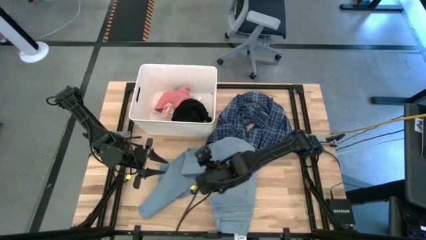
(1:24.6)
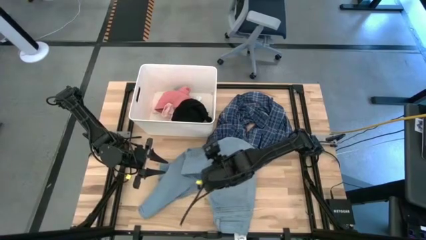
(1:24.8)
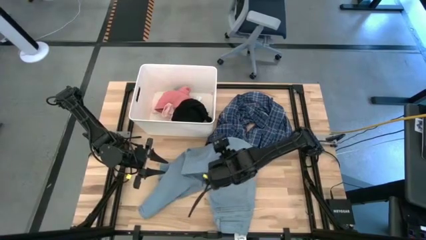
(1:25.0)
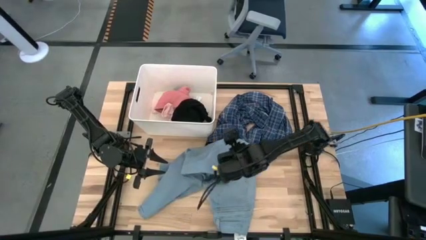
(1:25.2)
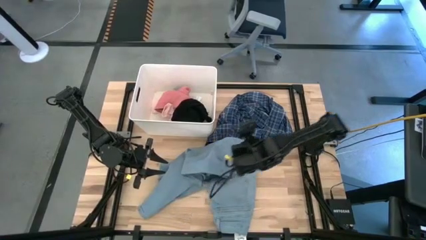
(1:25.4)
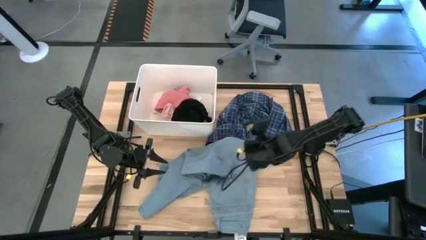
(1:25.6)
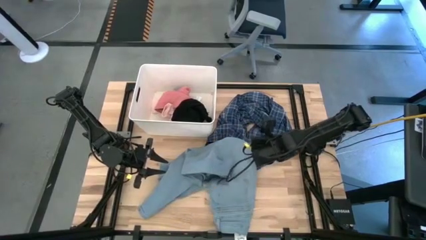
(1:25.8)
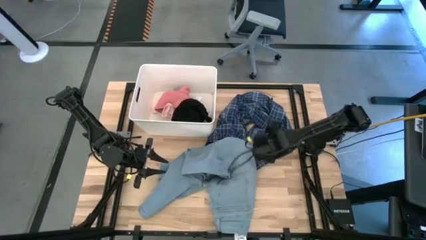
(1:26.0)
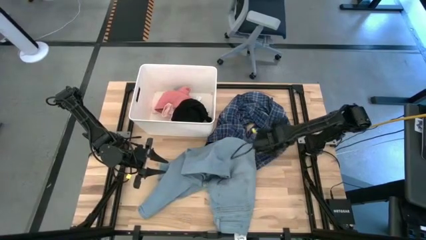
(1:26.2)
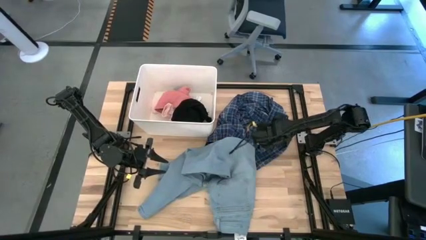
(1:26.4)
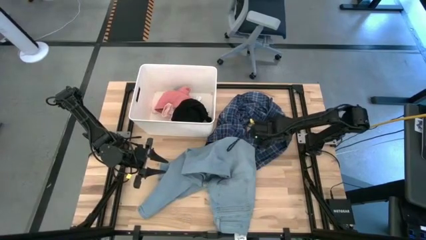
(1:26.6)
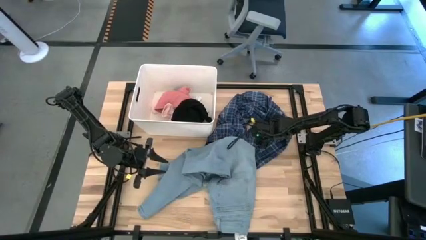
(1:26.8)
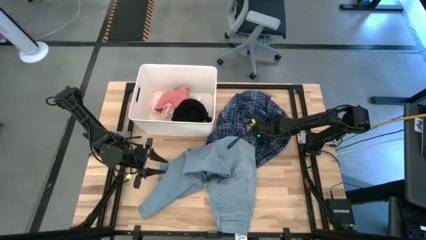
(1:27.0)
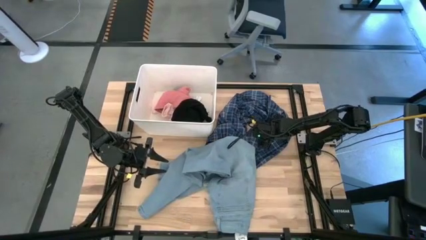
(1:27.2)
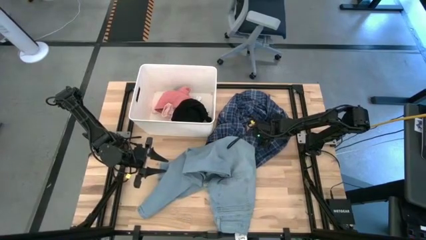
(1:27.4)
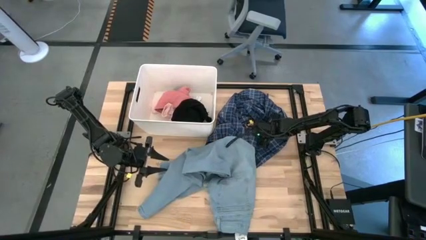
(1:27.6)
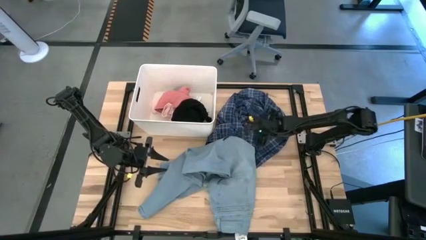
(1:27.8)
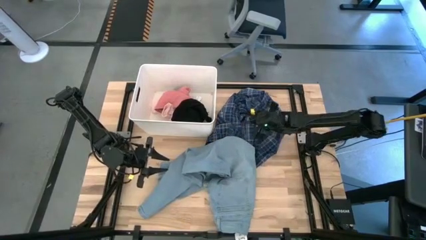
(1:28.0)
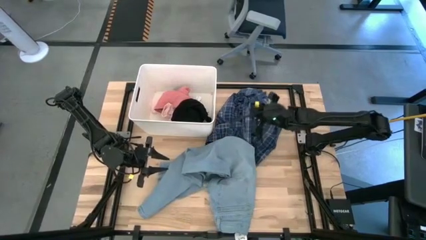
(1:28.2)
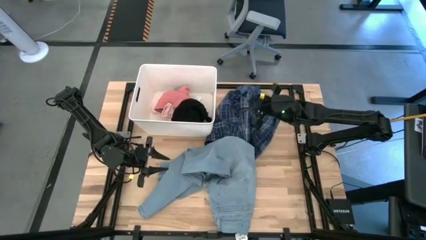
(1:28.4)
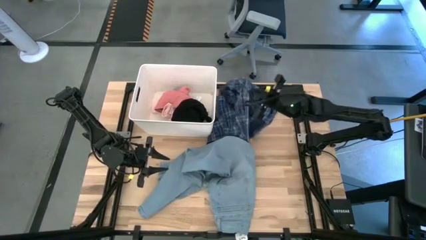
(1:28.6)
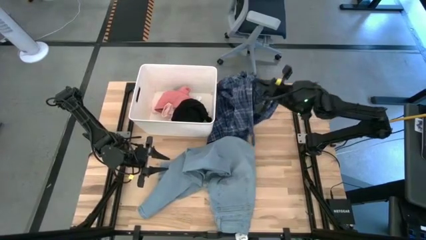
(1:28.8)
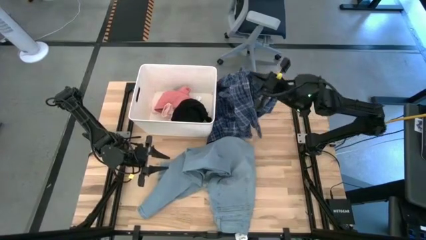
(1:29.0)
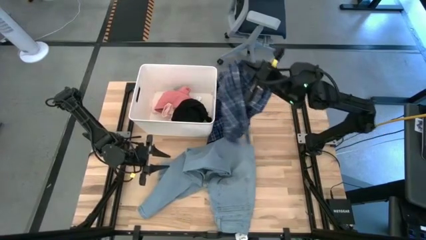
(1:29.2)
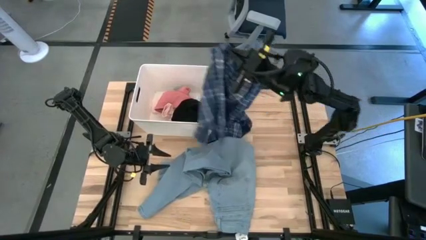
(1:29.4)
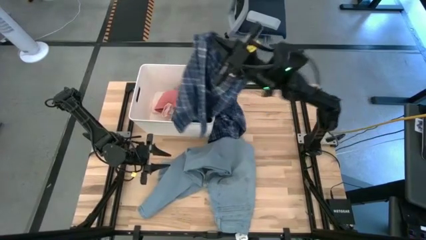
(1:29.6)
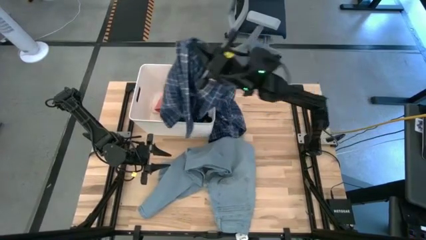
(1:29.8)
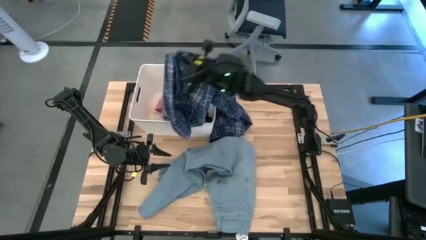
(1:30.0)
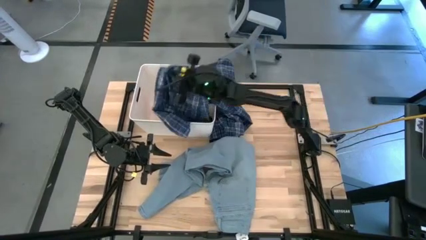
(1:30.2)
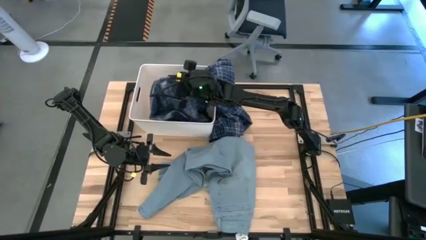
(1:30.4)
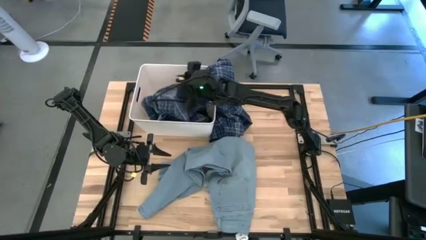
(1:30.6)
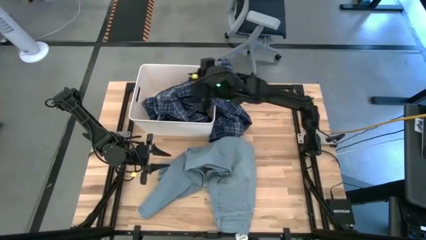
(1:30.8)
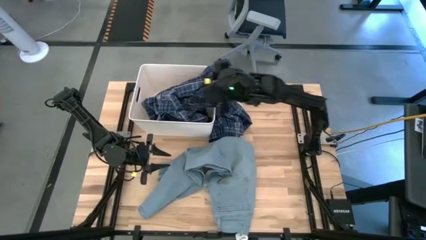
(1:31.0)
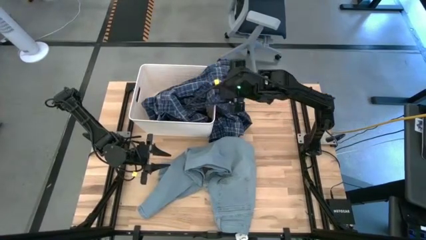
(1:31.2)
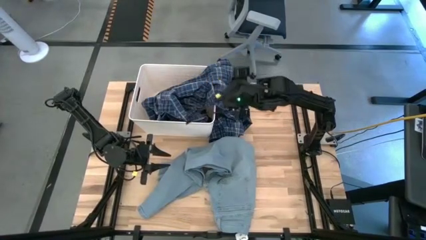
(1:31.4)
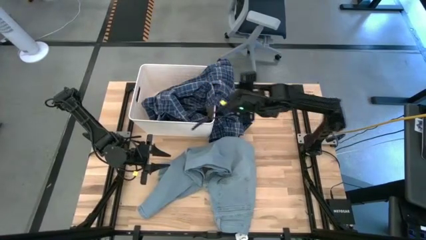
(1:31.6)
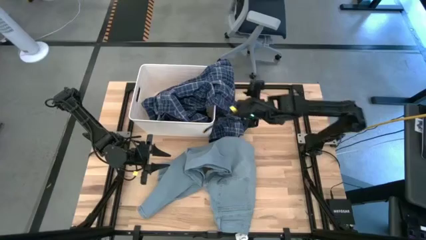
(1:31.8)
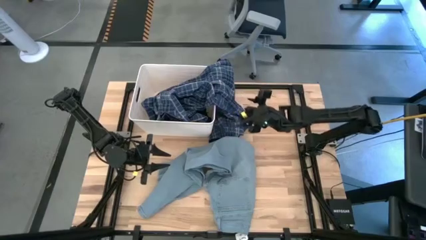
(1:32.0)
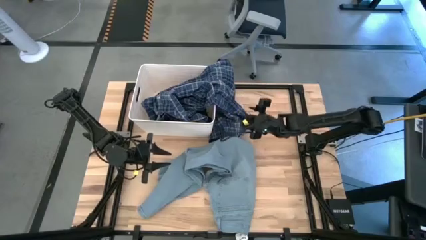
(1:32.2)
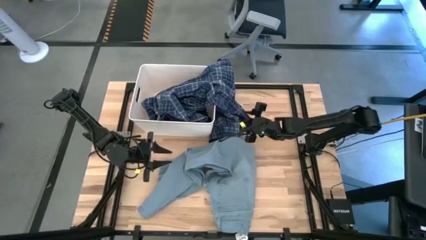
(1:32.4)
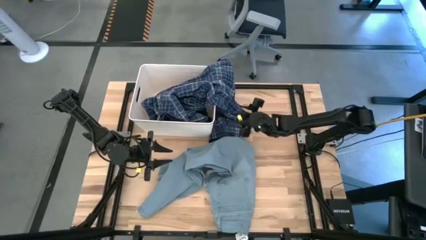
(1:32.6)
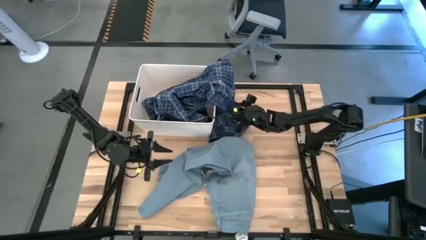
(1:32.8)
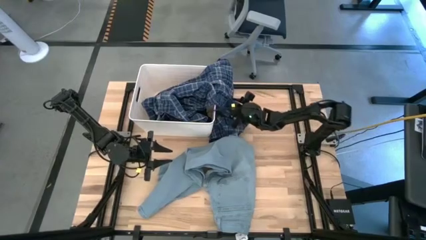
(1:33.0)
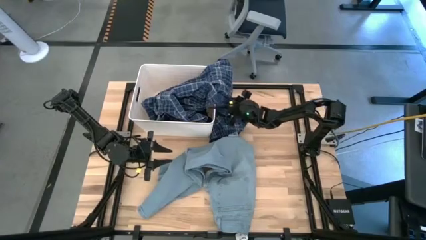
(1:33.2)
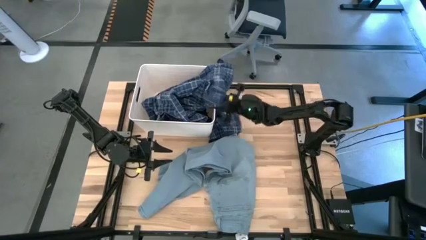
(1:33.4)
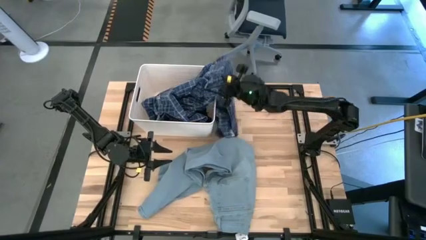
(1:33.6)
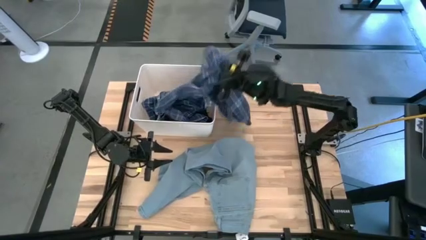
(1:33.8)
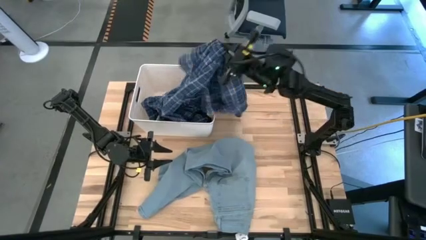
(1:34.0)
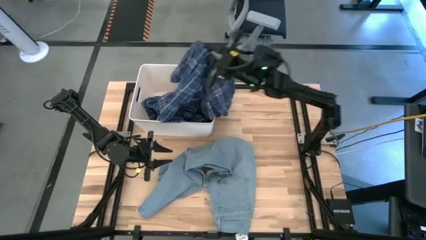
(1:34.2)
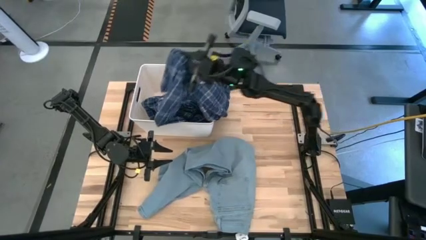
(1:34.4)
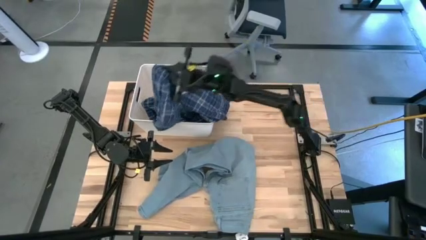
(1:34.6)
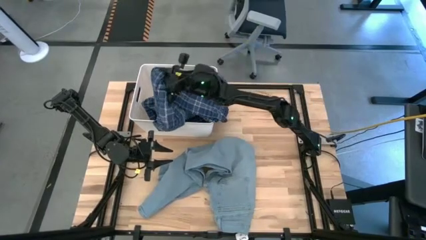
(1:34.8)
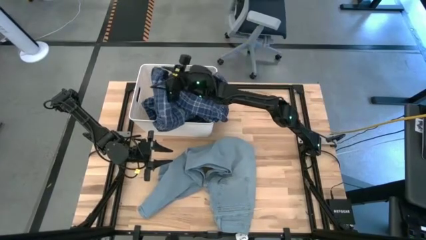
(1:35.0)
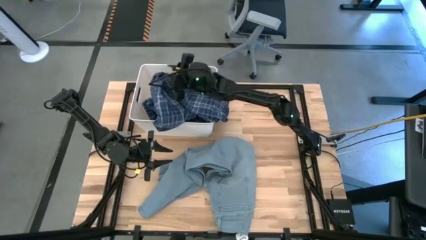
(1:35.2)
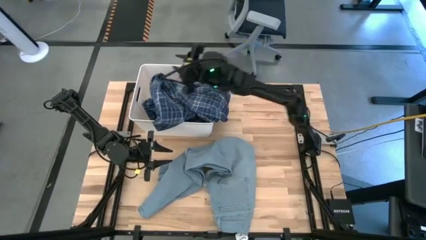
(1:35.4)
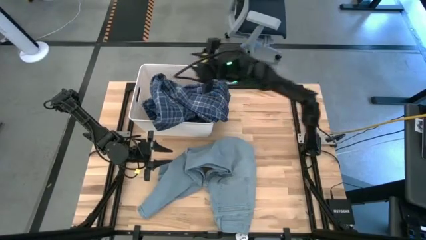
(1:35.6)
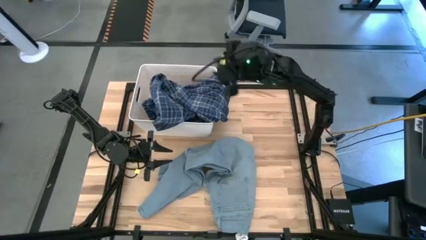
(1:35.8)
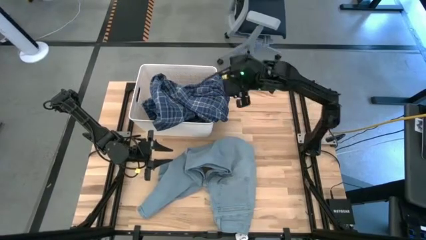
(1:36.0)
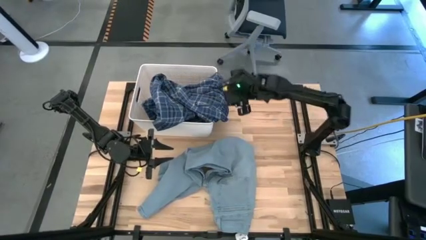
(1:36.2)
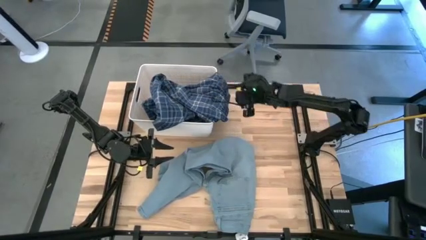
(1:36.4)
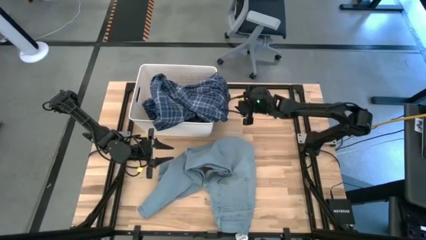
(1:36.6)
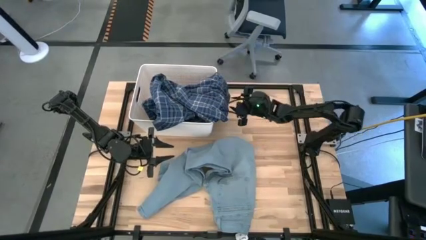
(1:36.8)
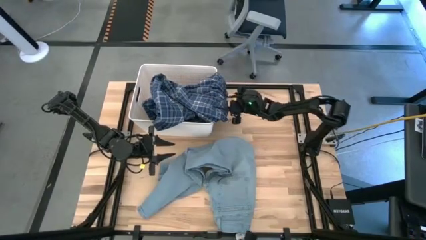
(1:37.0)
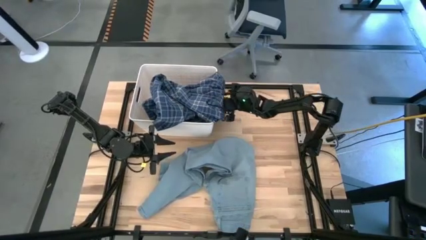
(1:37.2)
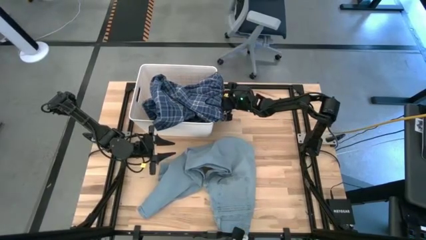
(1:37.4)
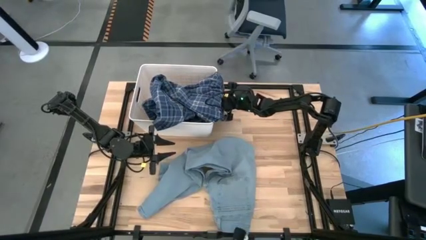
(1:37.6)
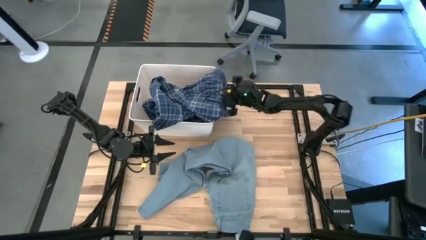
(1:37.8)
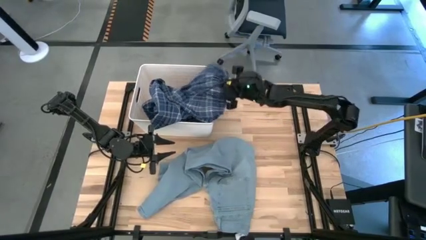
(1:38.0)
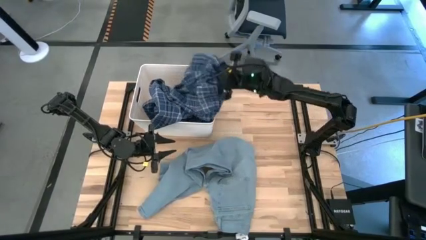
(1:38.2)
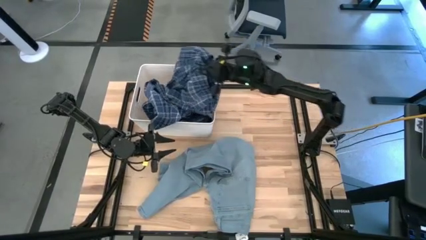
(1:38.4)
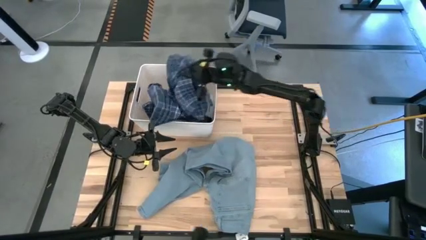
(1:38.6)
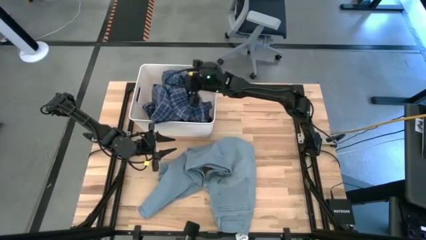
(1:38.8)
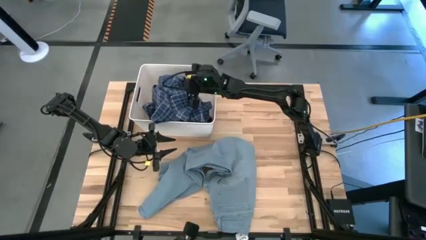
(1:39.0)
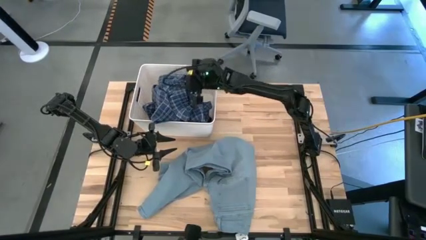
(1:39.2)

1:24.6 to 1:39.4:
Task: Sort clothes
Put the blue checkered pants into the white laundry bin

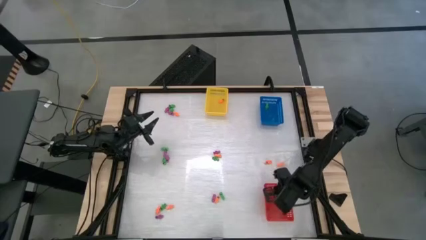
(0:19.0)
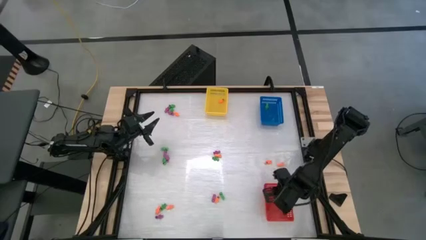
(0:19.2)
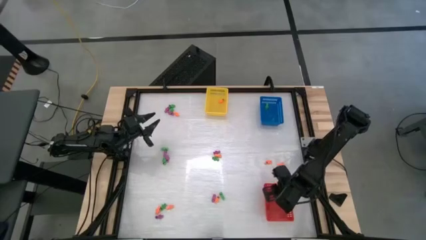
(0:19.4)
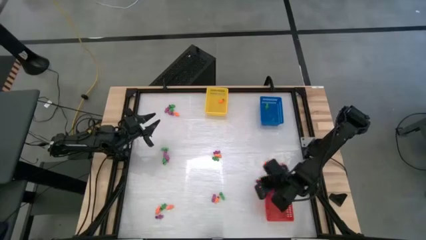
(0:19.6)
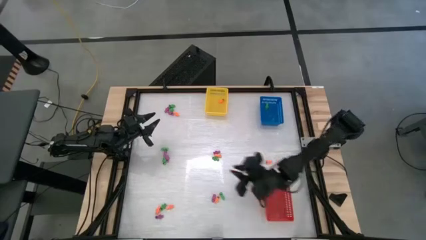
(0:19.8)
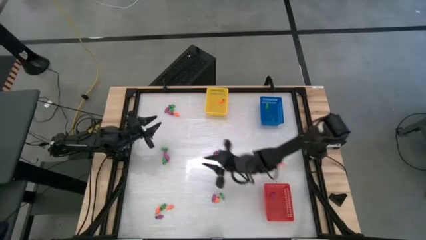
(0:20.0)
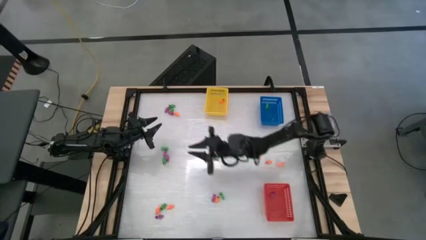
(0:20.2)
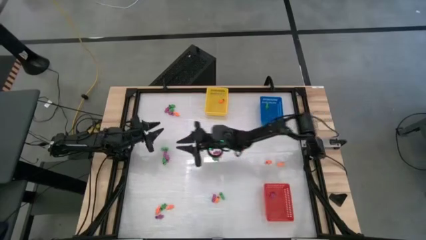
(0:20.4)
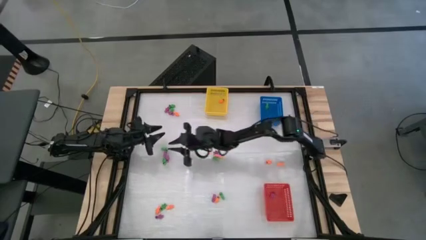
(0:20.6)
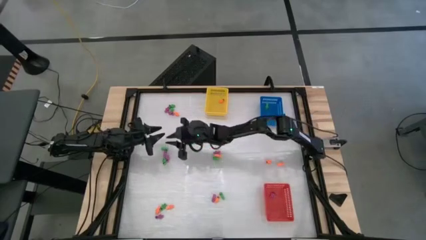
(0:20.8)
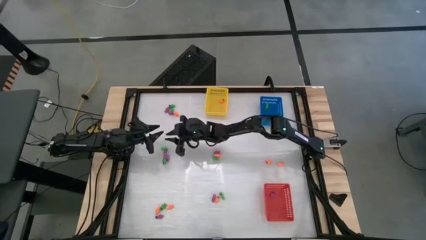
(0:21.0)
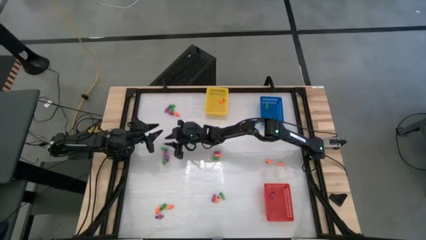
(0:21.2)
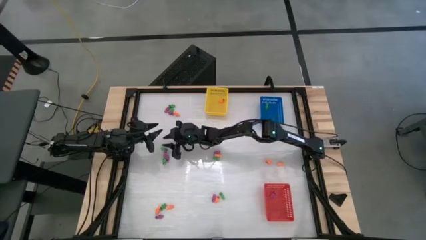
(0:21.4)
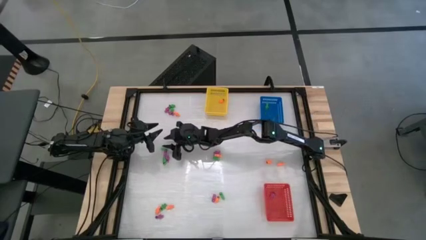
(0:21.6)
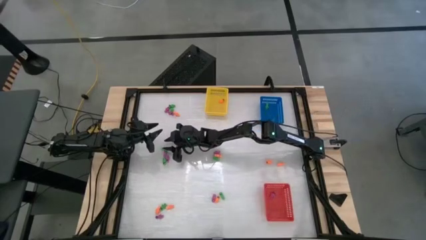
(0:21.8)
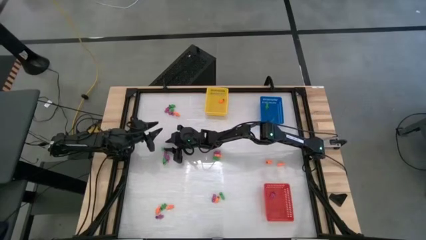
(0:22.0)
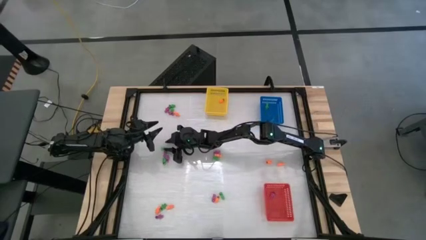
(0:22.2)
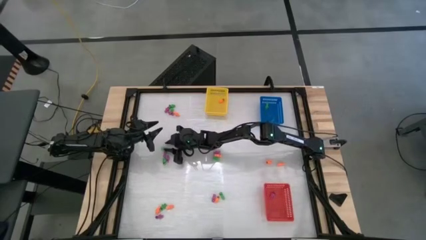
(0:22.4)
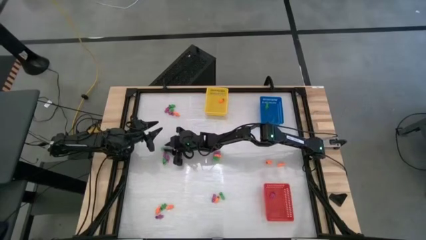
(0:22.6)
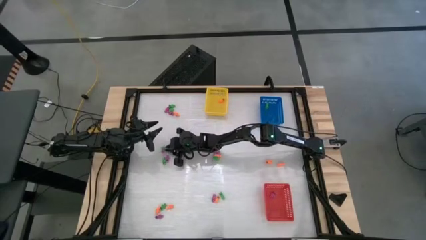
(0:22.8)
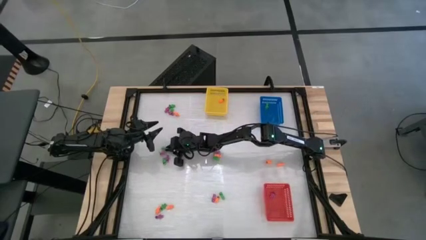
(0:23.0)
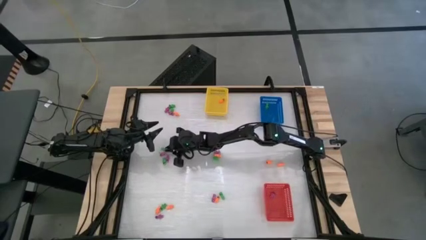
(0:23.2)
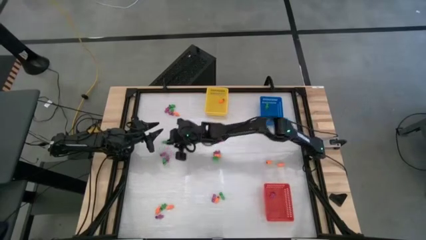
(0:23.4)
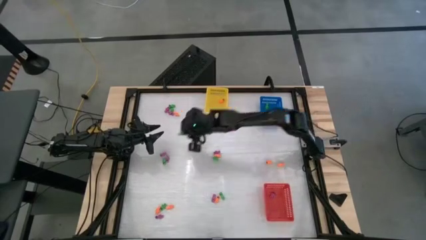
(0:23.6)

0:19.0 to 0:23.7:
Task: Sort Halloween decoration
Put the green skeleton toy into the blue bin
